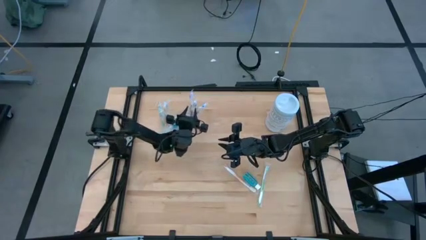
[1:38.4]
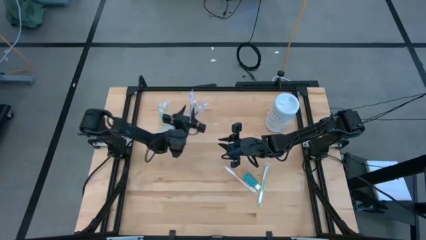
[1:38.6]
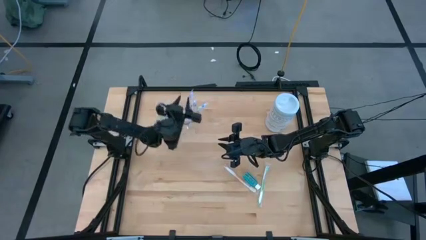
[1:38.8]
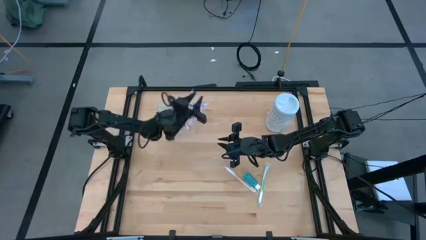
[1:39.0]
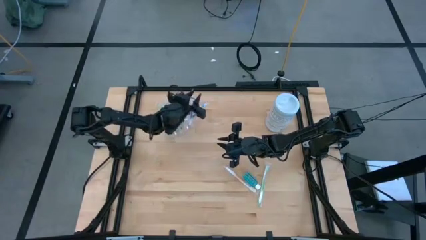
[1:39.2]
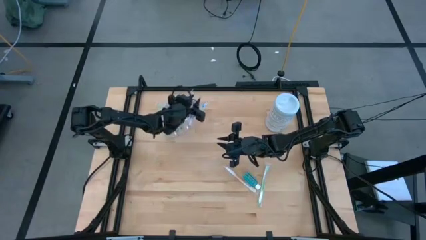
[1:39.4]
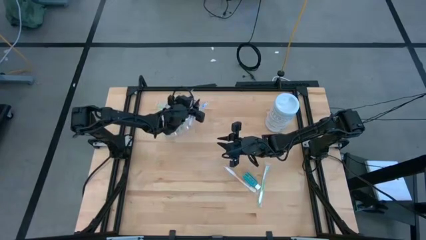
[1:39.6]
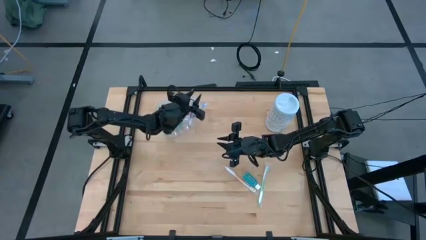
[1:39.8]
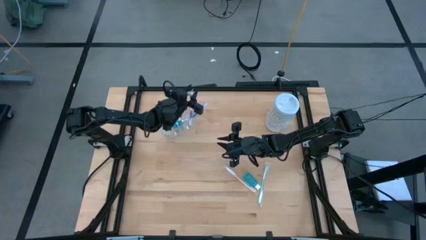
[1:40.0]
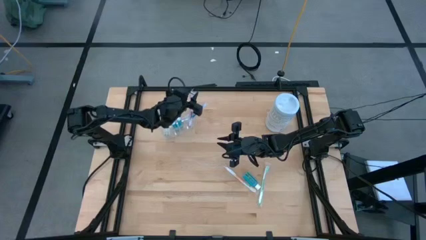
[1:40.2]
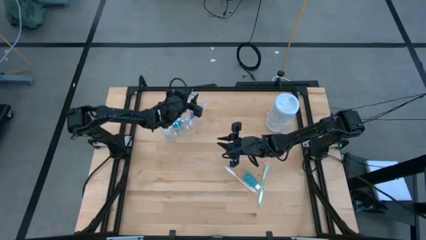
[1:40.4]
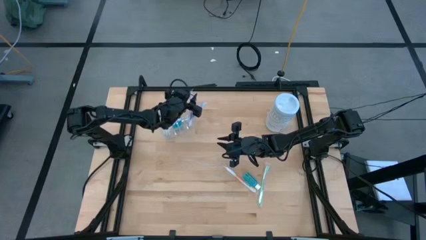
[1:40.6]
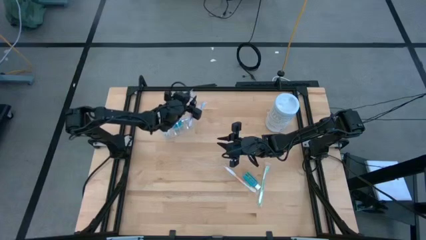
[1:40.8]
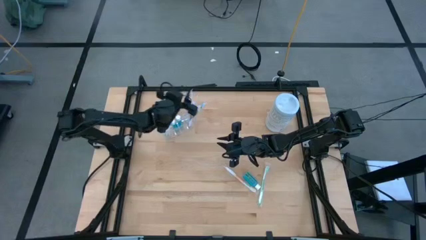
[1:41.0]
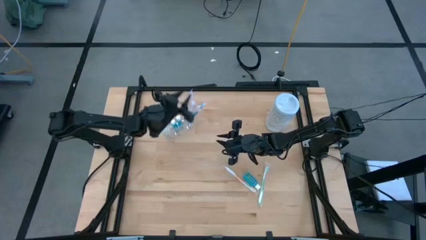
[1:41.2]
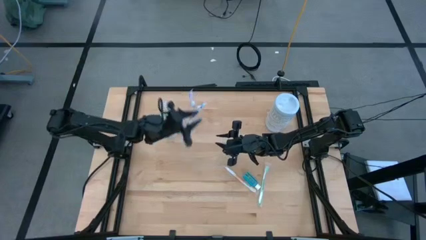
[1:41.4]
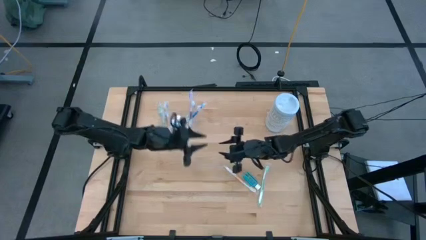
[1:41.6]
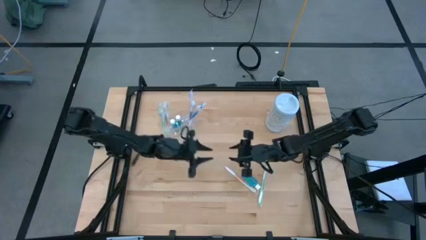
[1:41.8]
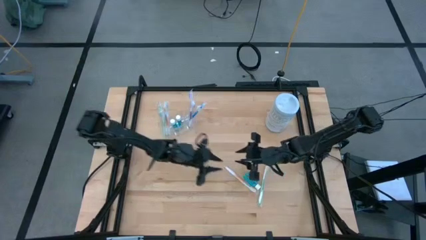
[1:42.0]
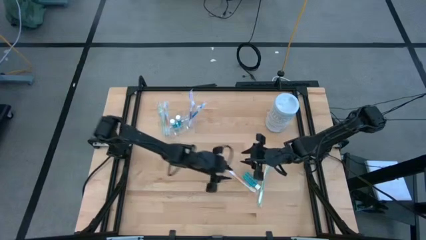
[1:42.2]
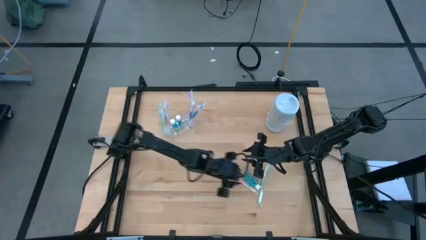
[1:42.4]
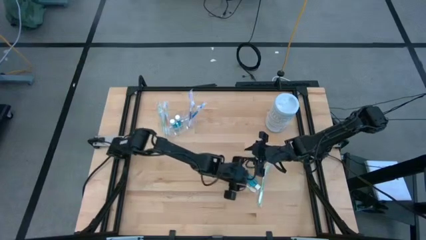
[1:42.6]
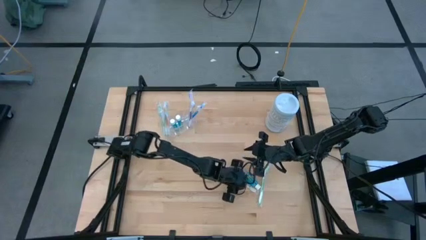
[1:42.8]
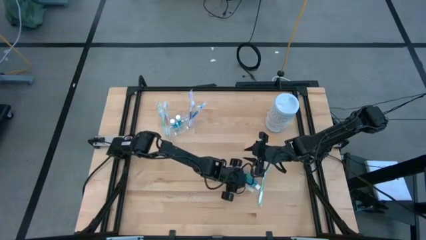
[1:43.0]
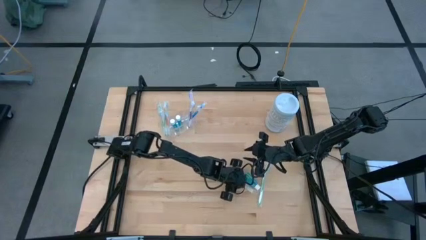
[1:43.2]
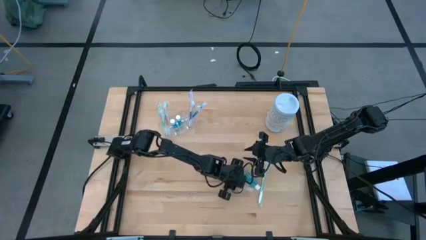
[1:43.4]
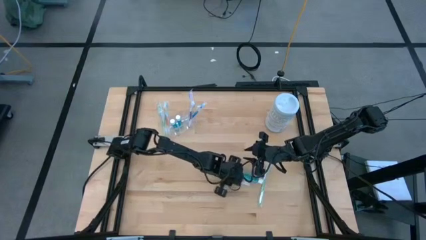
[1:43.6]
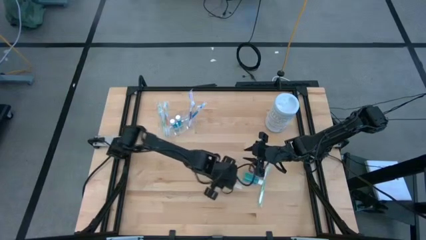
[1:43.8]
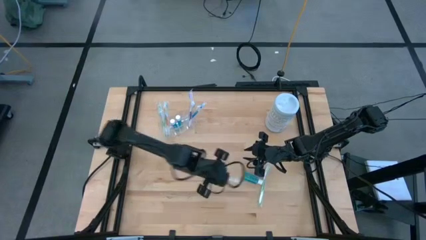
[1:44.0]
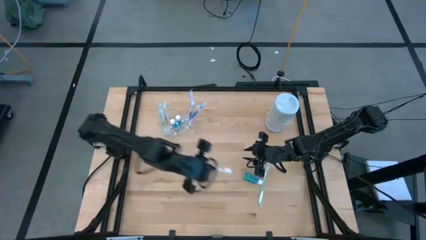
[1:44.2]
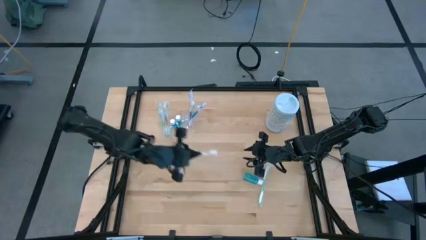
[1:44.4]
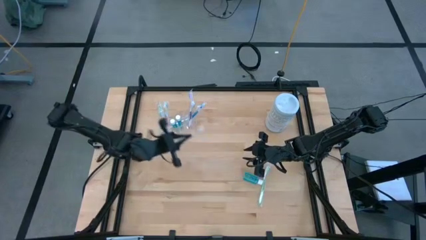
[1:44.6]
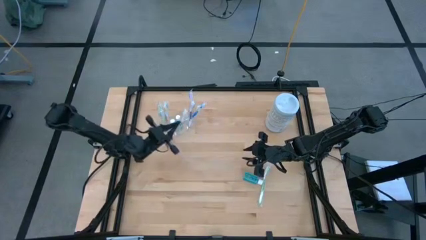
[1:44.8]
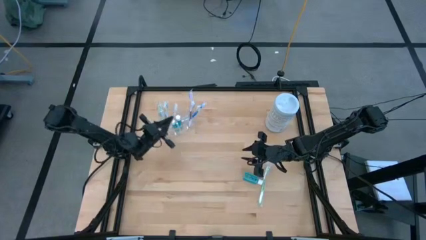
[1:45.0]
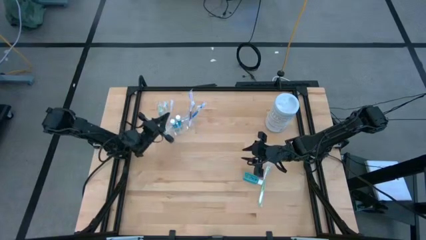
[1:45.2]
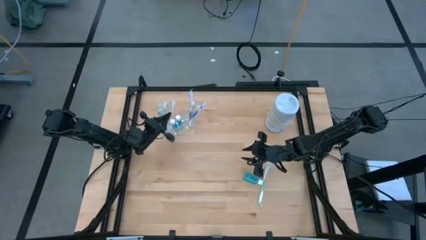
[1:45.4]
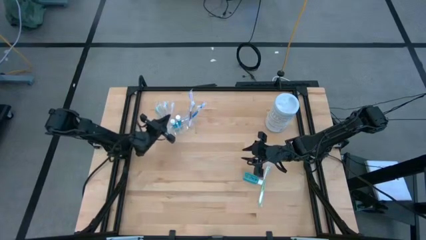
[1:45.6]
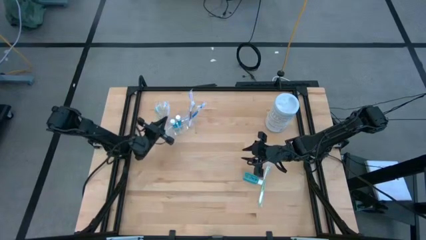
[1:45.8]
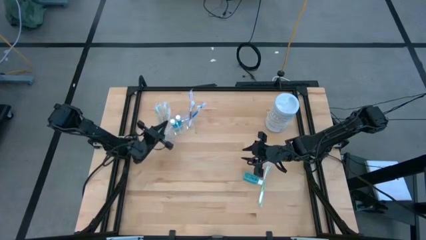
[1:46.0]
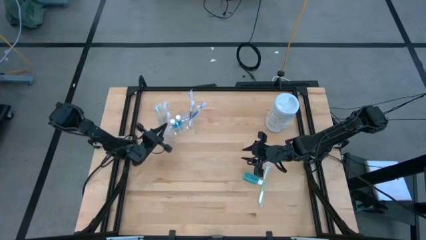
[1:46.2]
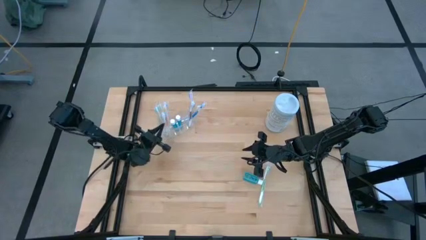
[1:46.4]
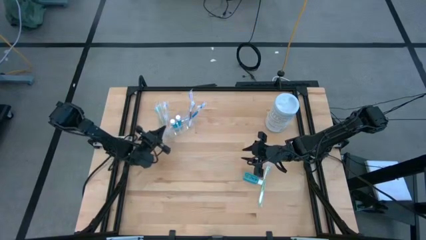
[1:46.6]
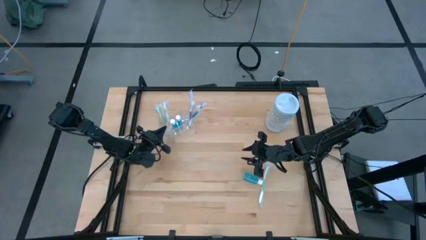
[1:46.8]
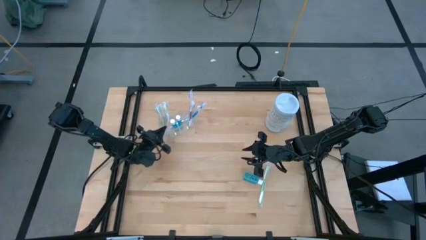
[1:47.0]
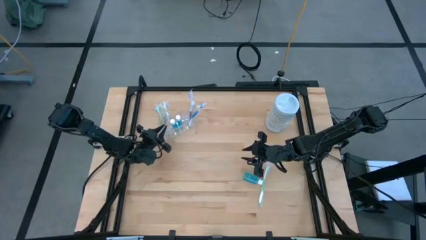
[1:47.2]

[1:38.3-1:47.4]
Task: Pick & Place toothbrushing station
Put the orange toothbrush into the transparent organizer

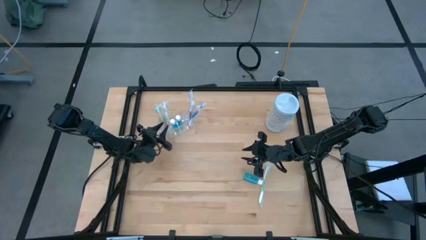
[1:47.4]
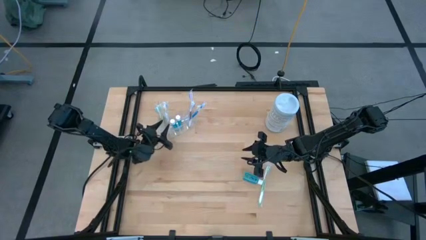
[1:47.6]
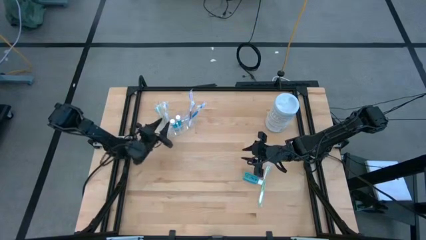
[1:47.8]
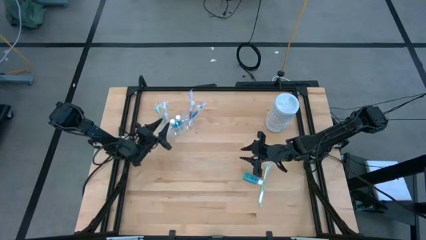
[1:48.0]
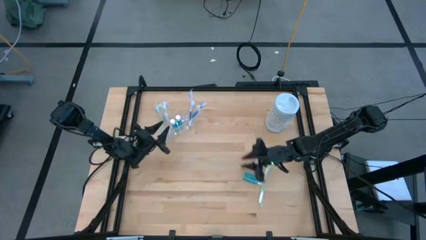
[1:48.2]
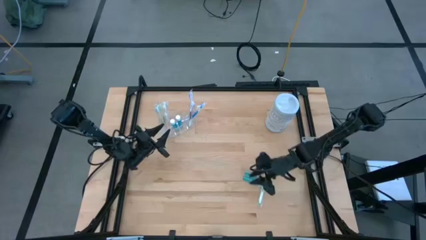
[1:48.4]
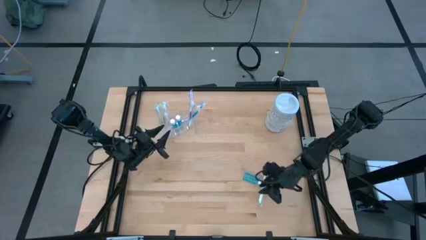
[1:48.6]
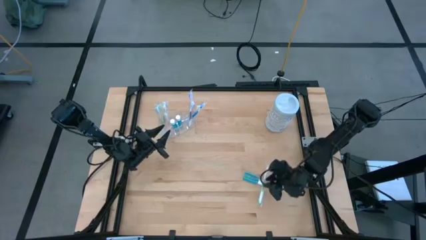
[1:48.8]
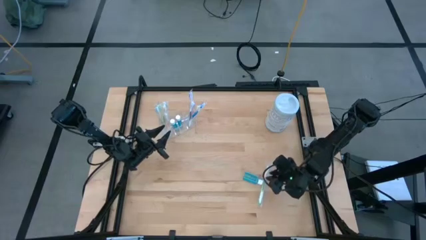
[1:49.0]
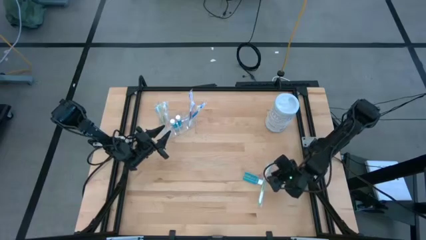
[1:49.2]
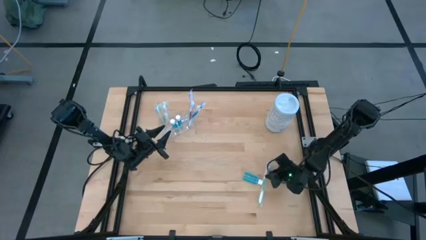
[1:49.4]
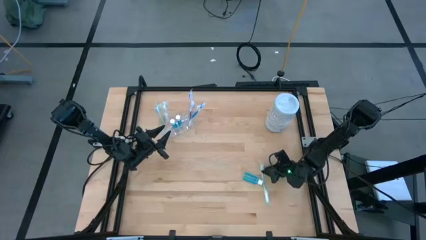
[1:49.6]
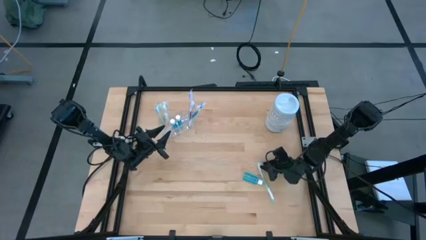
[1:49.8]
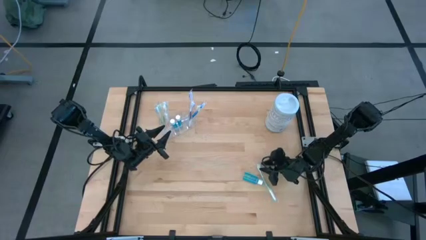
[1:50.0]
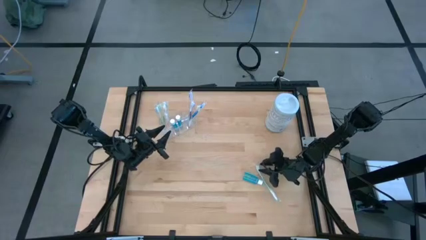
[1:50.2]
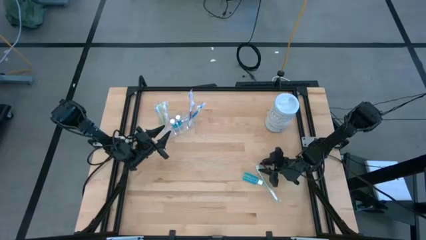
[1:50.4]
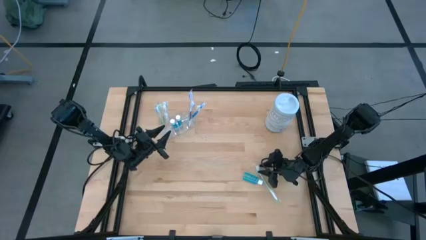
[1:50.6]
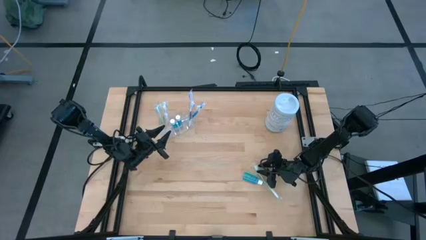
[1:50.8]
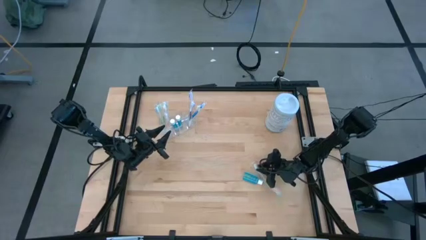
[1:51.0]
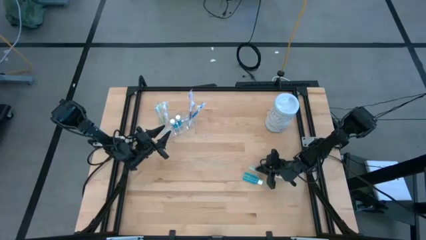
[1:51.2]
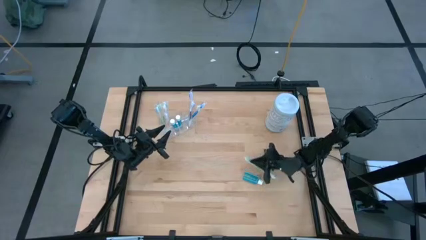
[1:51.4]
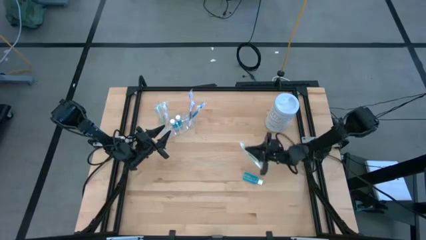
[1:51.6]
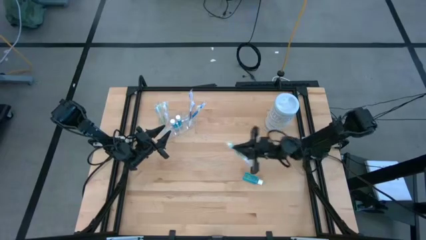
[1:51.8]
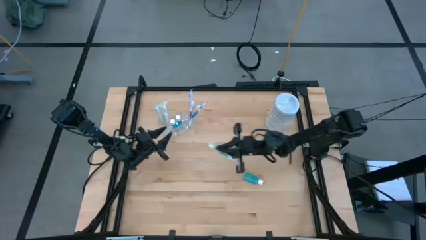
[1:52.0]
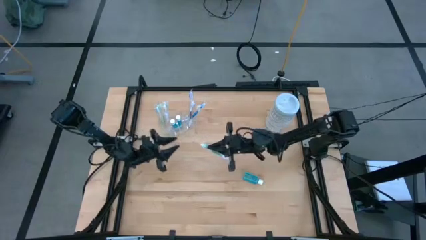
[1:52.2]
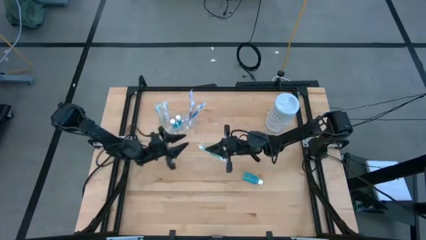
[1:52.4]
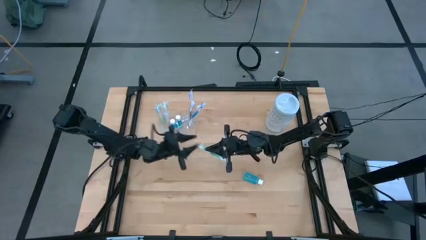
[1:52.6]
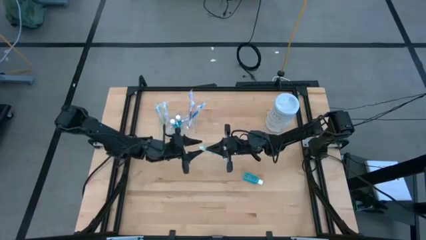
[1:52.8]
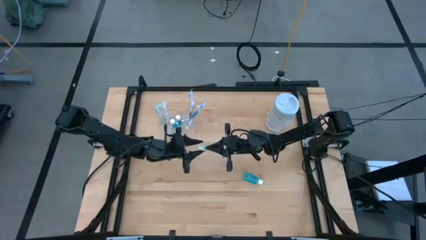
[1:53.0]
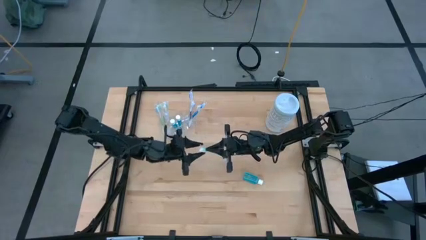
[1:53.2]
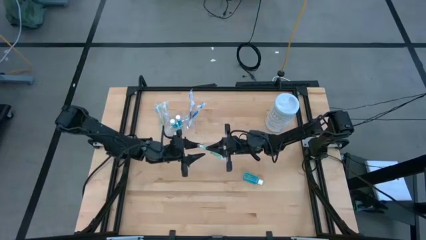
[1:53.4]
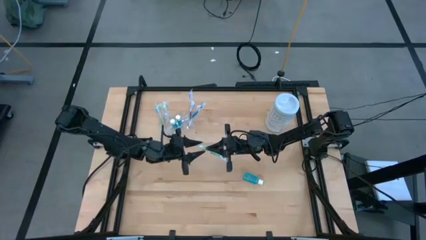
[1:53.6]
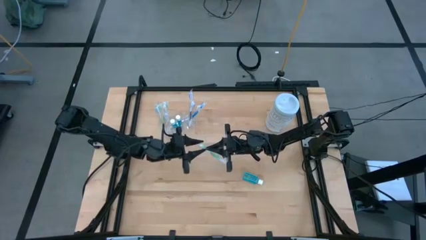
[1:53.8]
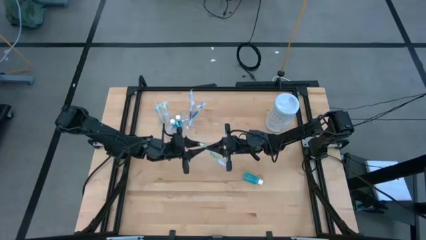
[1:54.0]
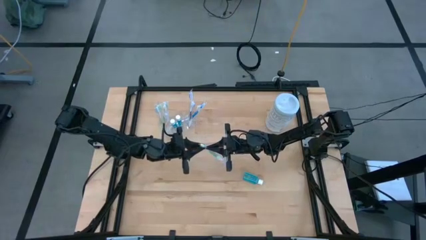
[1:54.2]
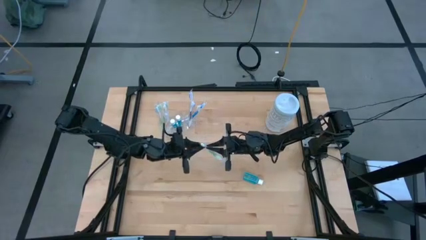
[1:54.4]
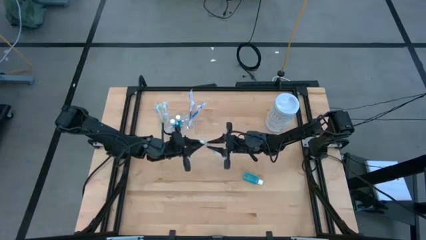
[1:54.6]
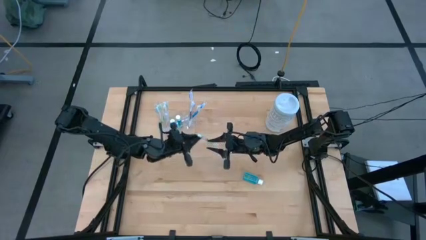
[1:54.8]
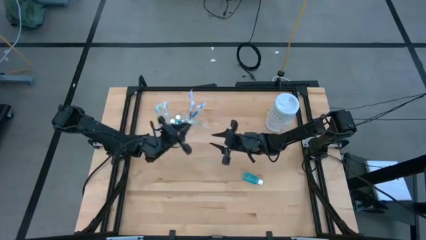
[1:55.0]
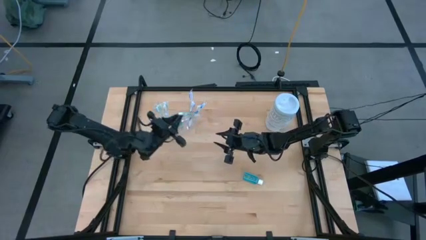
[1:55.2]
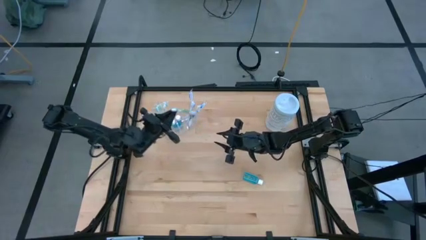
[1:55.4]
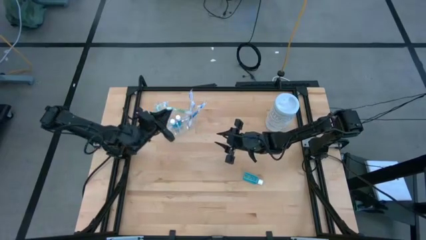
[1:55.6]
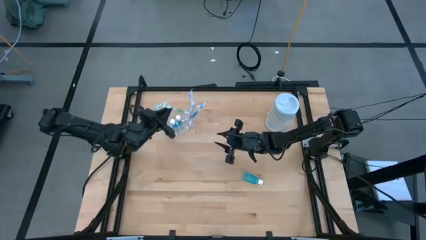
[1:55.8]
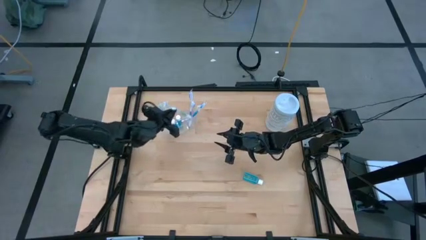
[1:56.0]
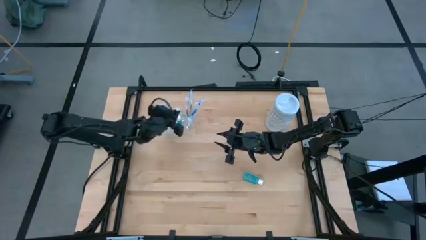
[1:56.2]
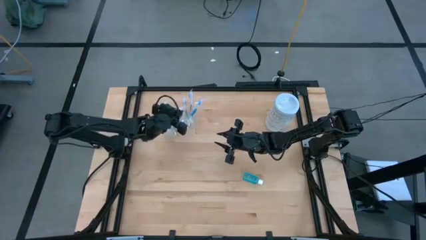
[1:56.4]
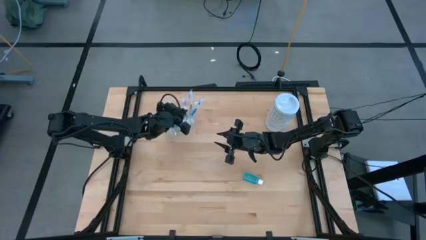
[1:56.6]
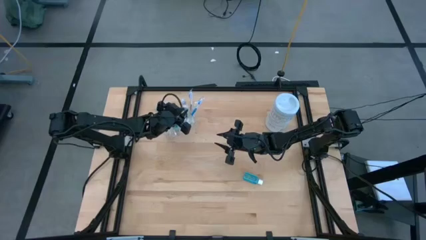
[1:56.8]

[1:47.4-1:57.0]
Put the green toothbrush into the transparent organizer
